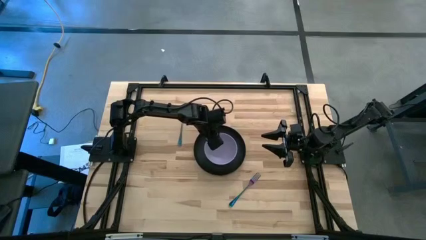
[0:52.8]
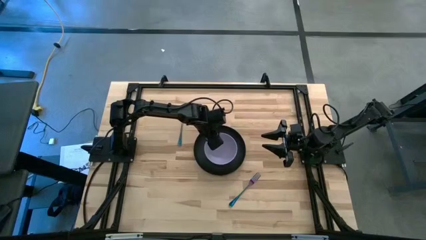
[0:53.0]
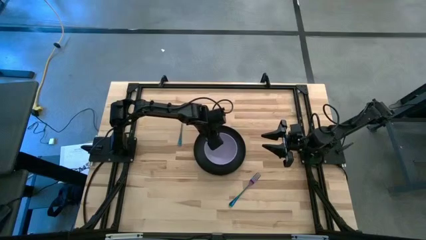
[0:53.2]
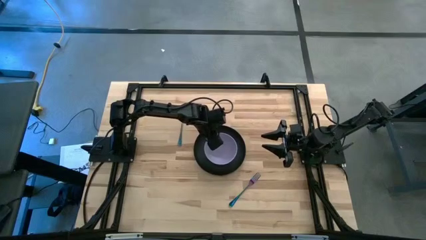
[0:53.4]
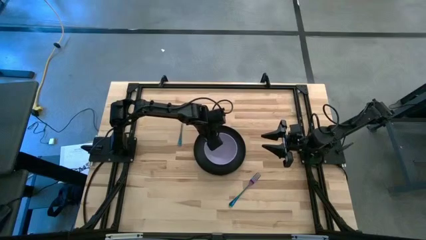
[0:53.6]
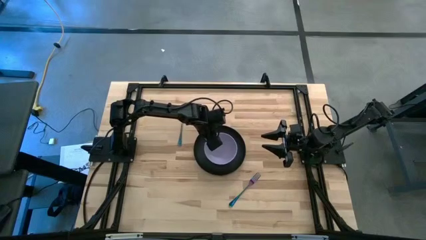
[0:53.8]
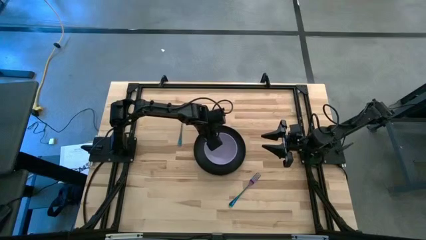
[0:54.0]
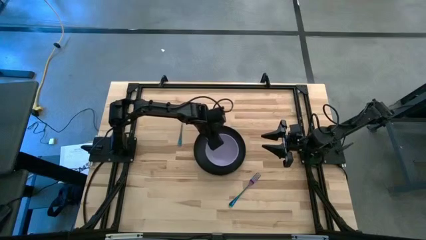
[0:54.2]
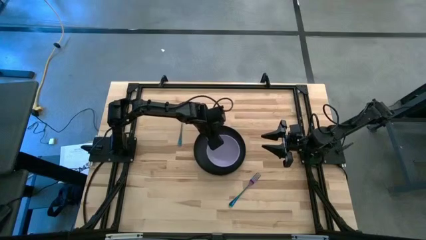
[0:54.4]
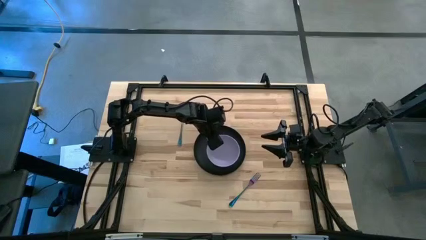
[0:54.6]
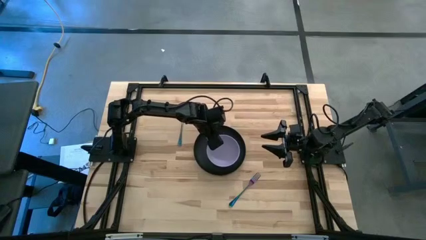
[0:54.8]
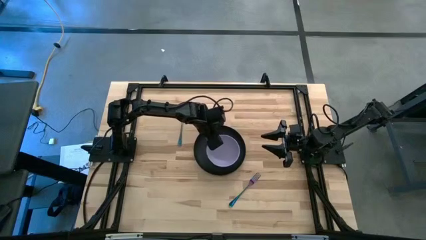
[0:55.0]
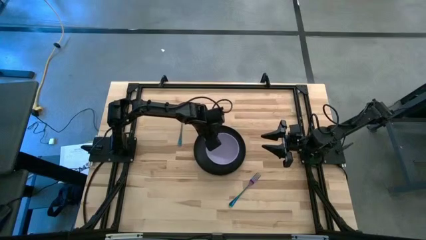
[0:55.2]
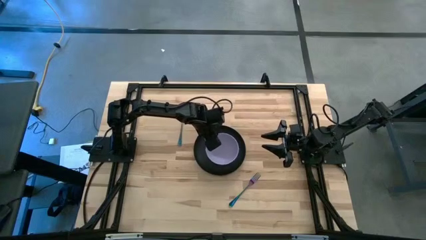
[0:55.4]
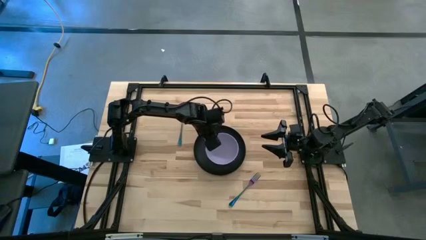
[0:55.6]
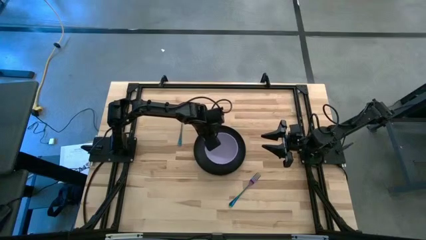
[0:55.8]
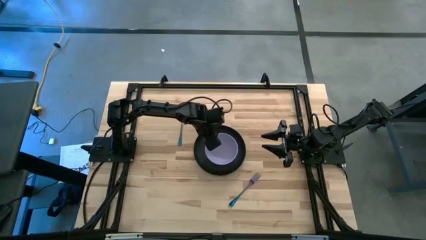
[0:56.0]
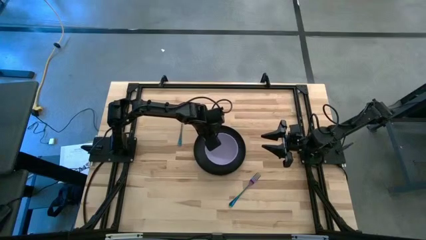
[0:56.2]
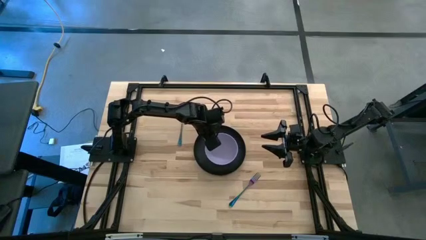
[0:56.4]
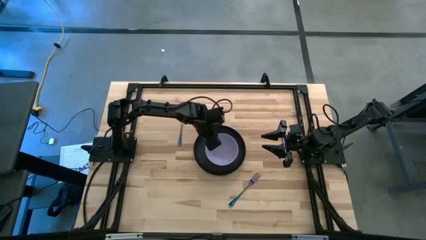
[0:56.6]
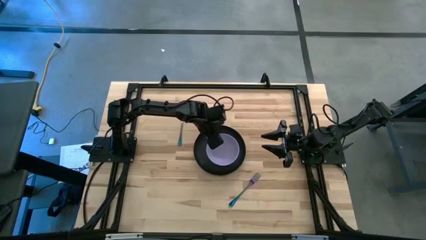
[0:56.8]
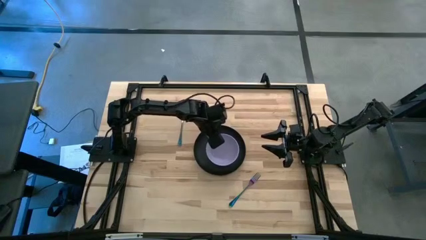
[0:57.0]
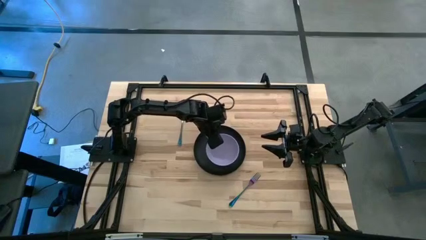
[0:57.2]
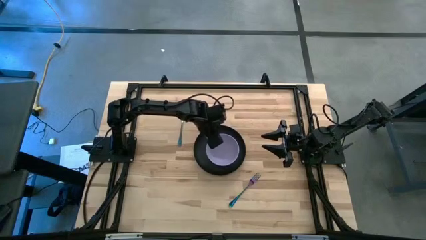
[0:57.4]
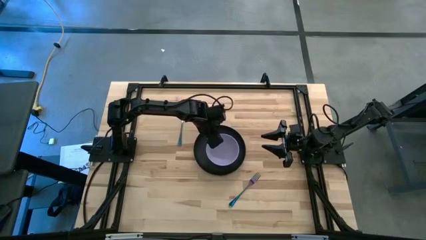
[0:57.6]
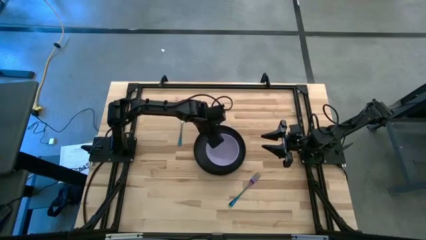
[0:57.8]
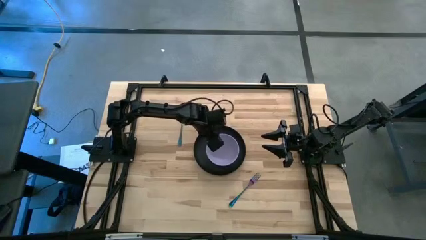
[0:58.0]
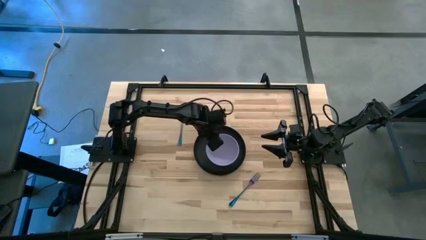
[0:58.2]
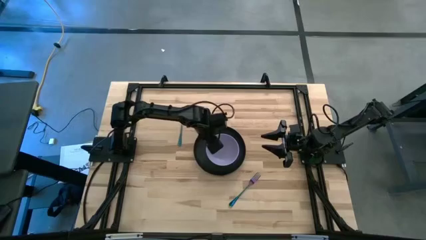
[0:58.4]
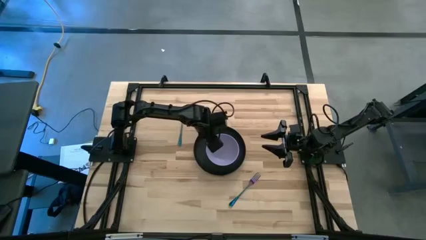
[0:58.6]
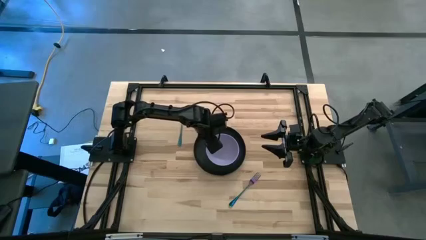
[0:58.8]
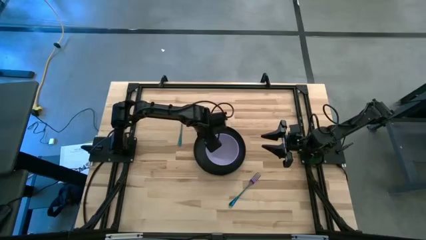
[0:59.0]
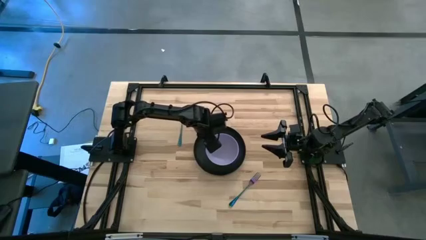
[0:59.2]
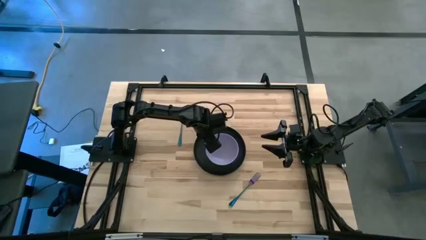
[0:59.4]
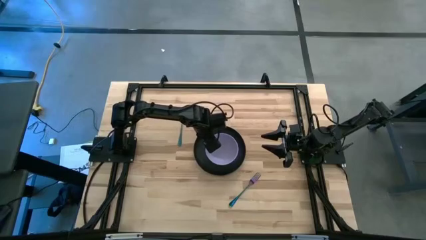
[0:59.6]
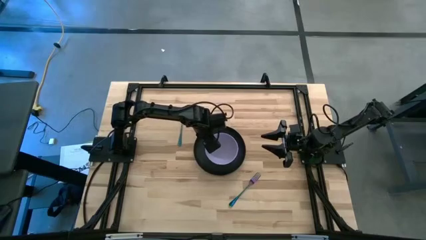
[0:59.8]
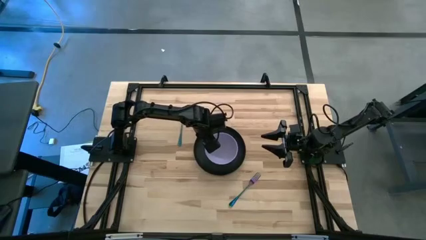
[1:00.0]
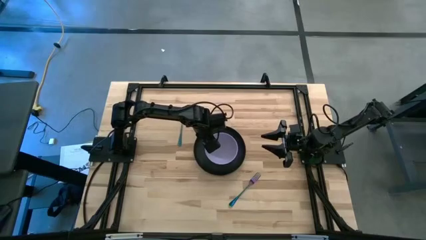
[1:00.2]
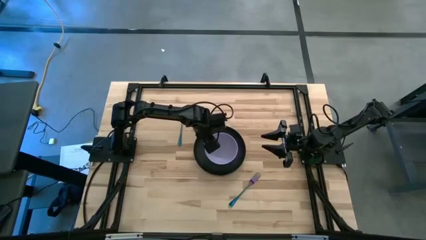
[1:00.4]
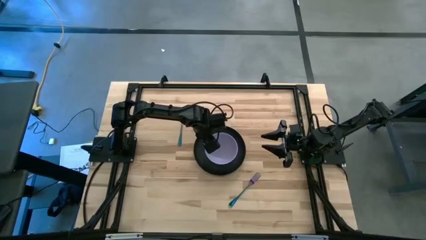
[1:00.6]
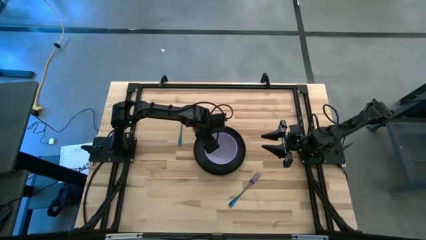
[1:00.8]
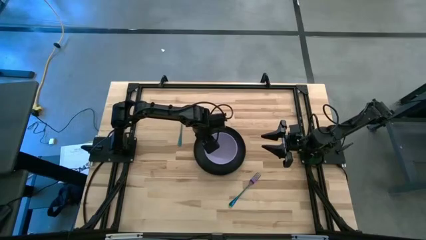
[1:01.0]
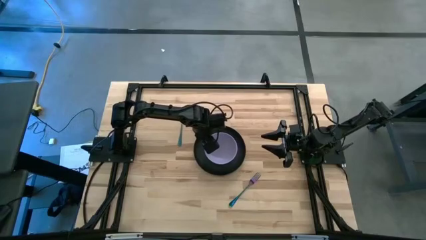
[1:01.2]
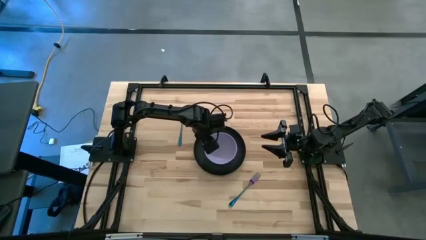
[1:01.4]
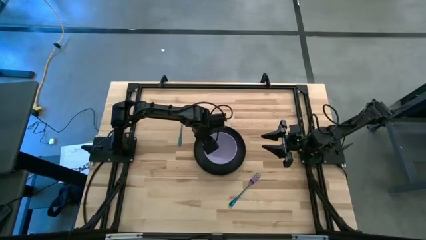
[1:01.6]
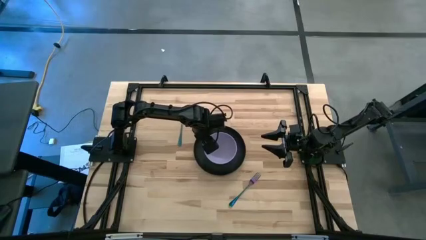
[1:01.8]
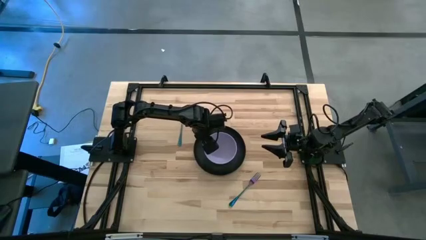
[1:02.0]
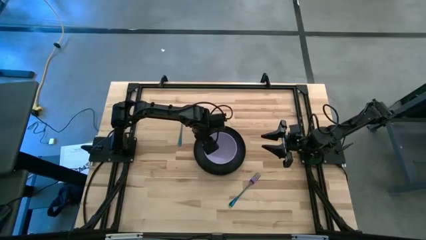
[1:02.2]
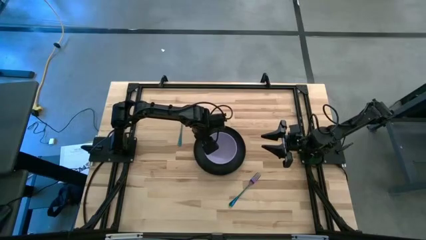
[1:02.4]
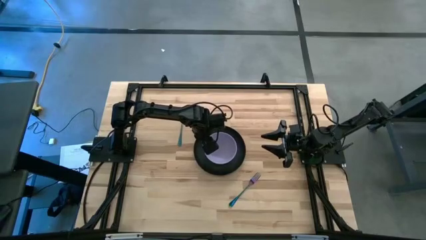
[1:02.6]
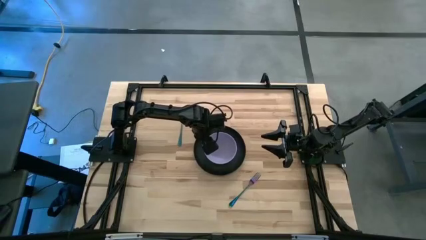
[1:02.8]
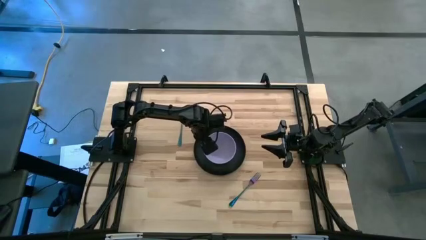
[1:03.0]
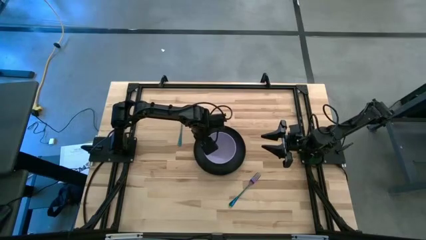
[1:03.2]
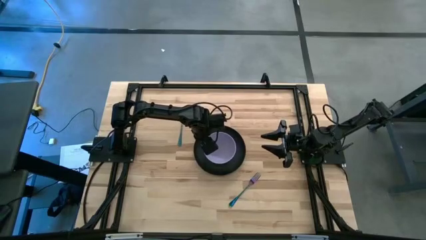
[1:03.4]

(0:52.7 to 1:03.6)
Task: Set table place
Put the violet bowl on the black plate

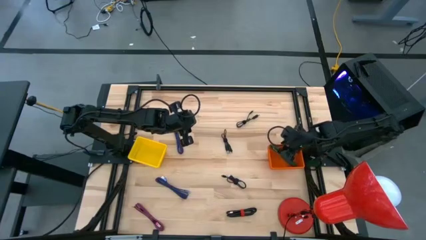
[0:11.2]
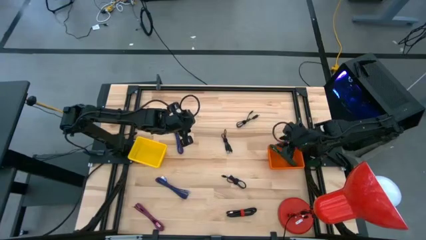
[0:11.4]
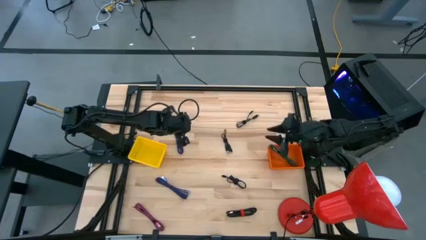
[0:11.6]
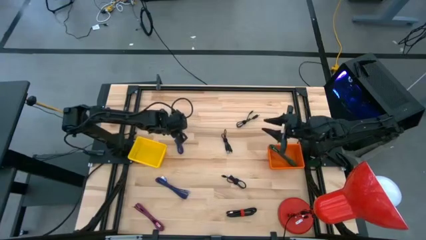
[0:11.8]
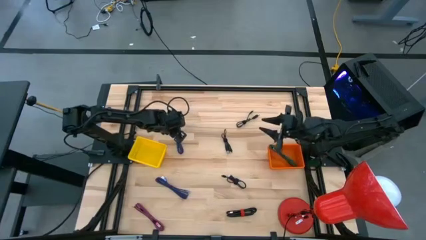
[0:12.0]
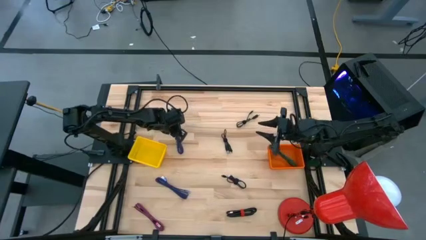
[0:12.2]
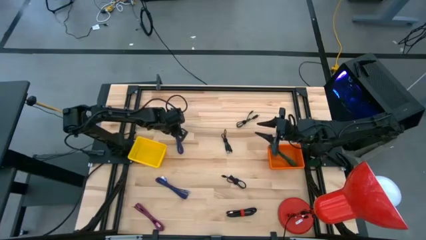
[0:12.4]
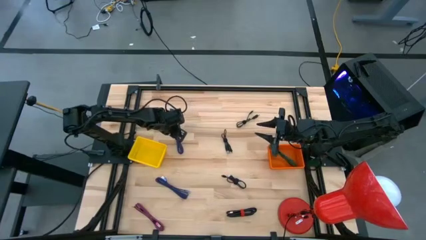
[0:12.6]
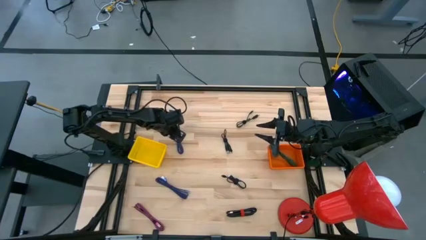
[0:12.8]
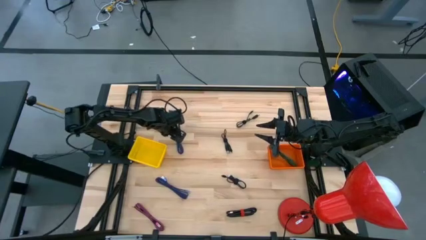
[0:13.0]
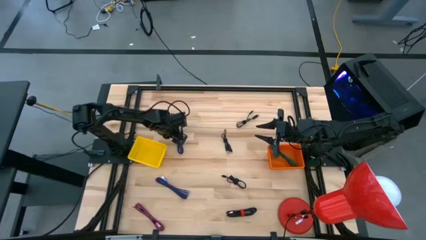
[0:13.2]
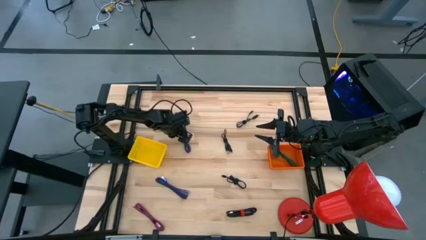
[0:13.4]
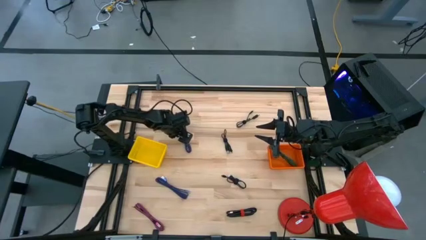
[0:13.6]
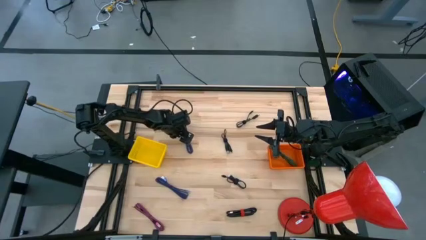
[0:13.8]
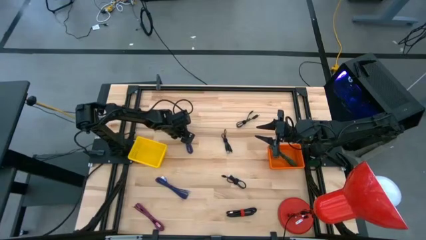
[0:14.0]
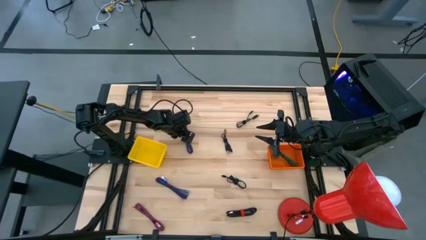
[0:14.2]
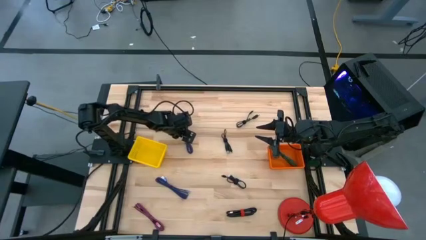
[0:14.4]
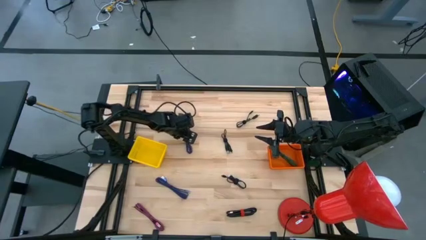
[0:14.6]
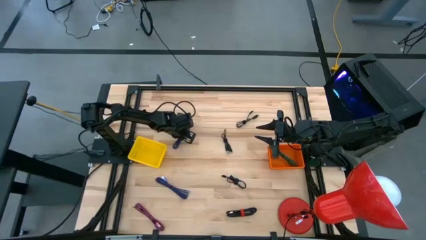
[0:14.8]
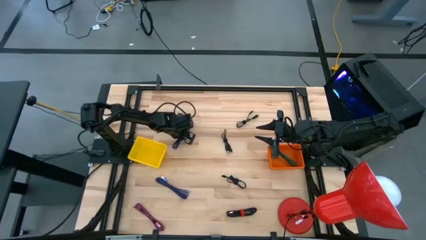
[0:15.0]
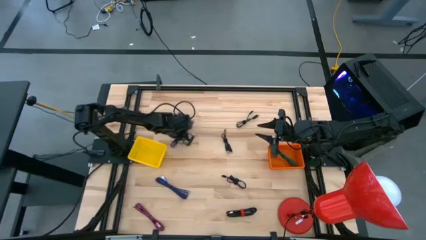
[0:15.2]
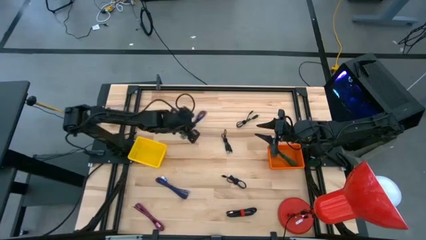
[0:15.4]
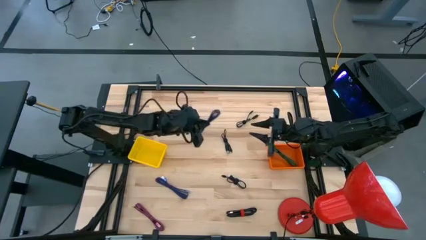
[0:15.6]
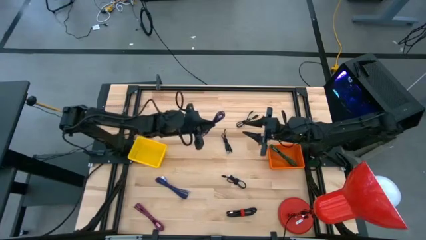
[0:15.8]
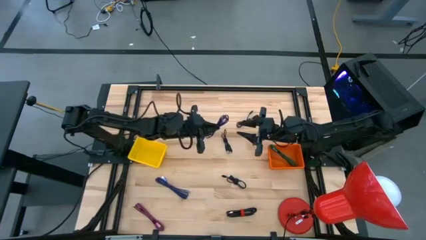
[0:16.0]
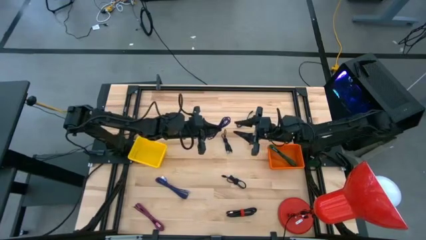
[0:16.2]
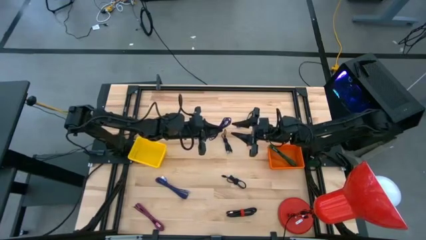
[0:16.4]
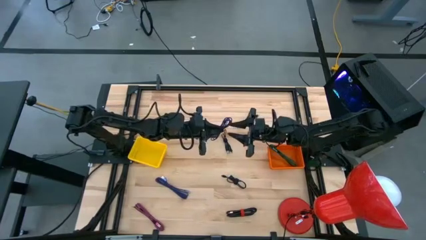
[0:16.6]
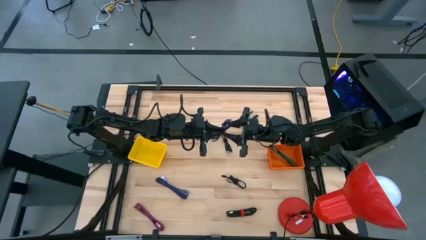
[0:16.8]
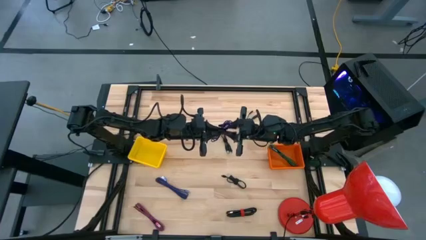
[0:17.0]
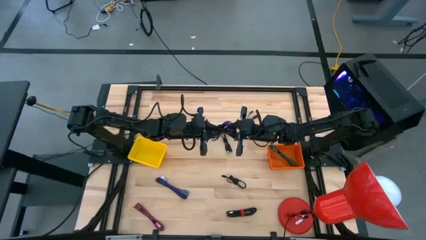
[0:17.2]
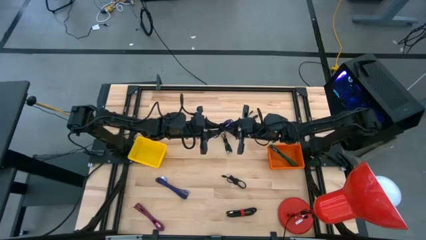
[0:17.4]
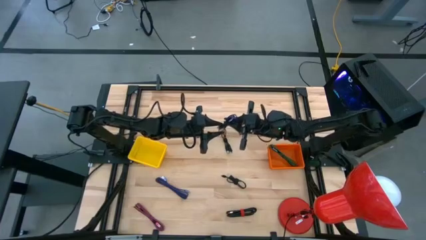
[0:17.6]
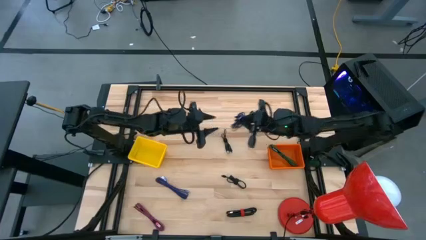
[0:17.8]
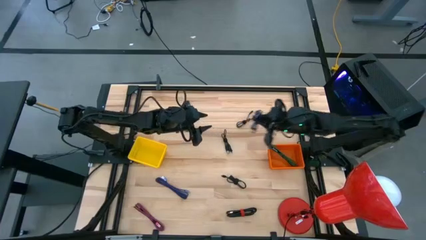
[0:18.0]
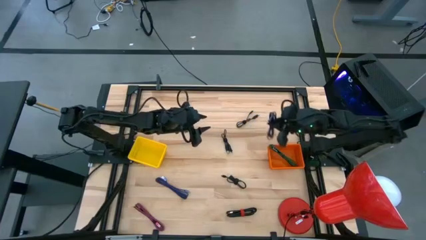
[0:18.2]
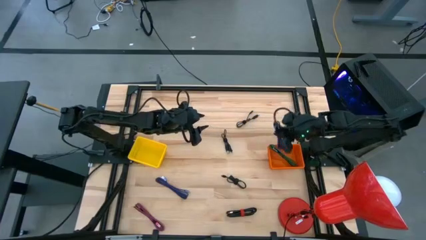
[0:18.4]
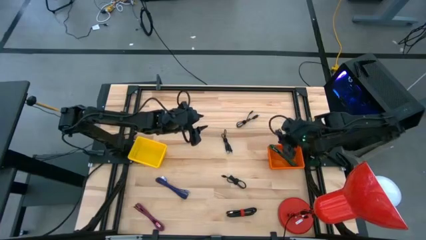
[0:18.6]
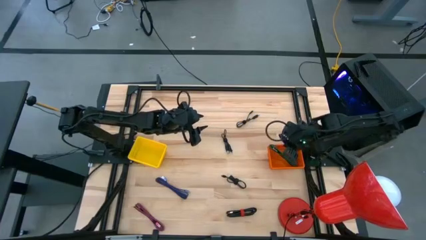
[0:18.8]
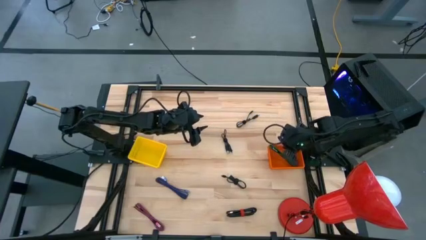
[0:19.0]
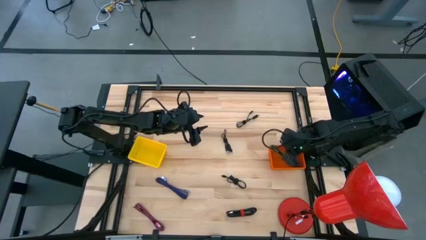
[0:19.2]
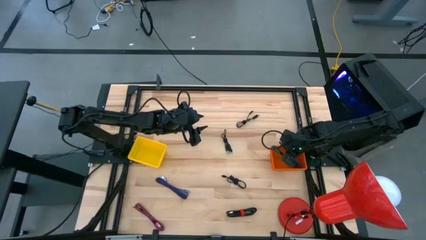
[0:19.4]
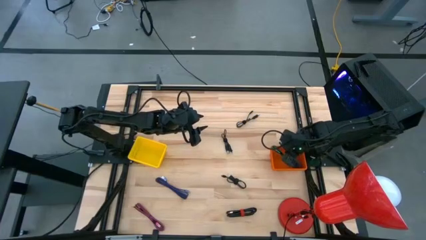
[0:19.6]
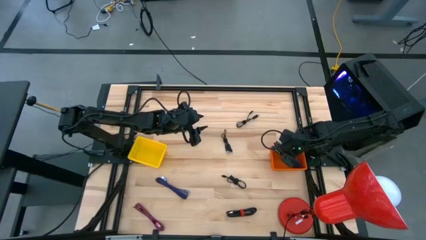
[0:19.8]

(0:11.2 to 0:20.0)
Task: Pick & Place USB Port
Put the black charger cable into the orange basket
